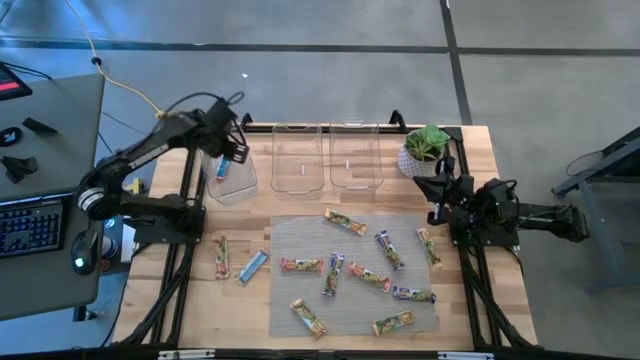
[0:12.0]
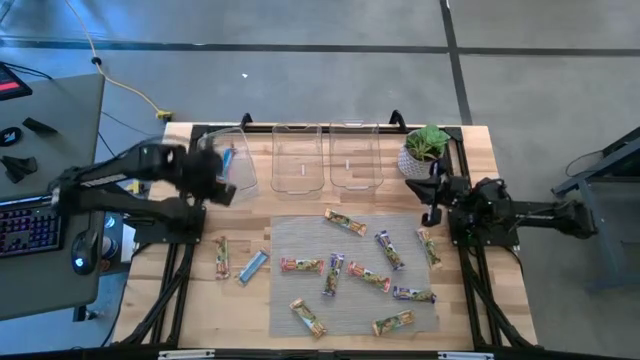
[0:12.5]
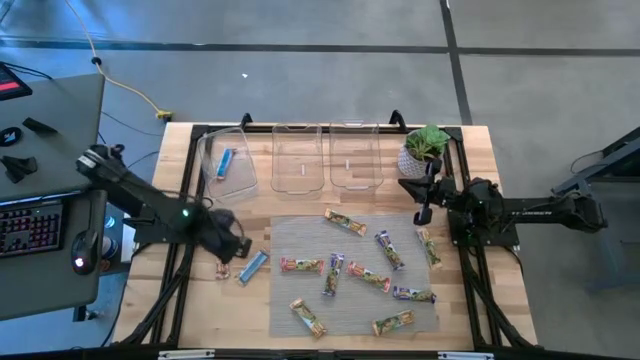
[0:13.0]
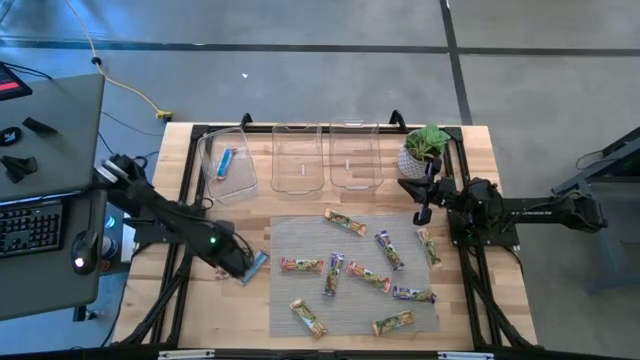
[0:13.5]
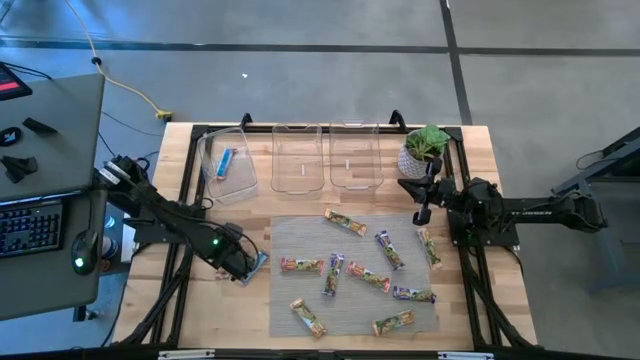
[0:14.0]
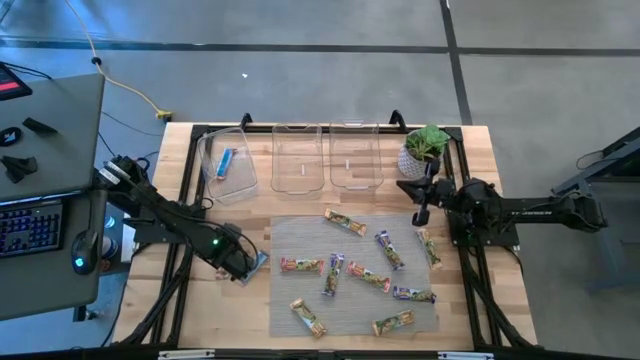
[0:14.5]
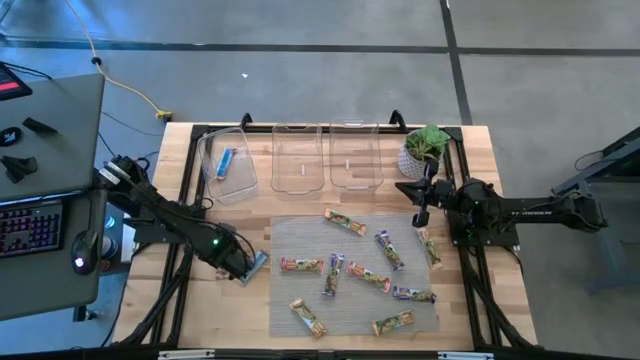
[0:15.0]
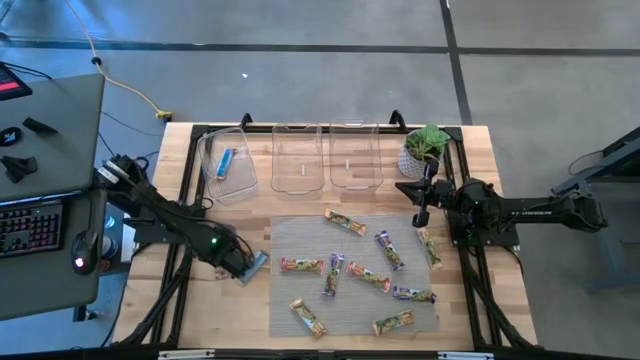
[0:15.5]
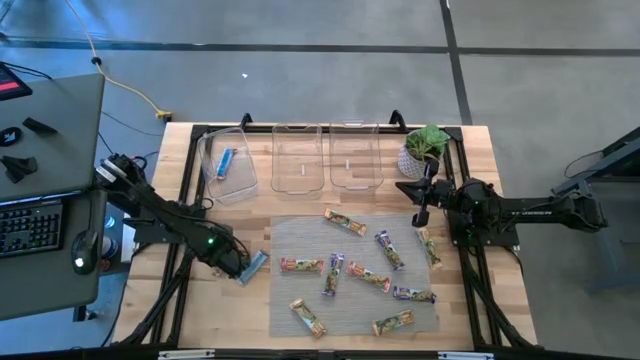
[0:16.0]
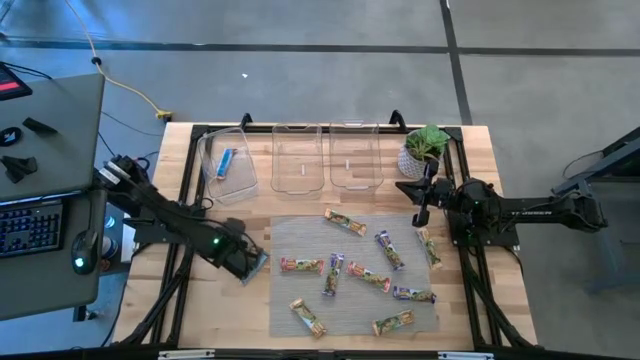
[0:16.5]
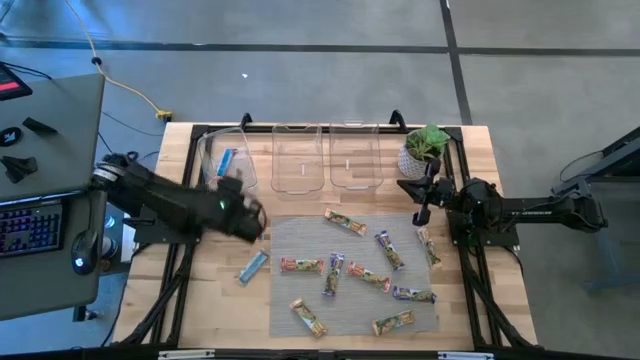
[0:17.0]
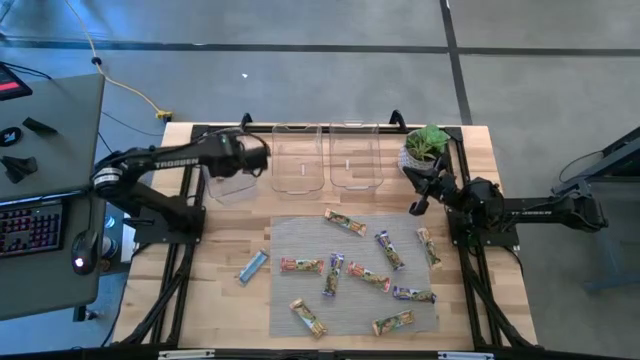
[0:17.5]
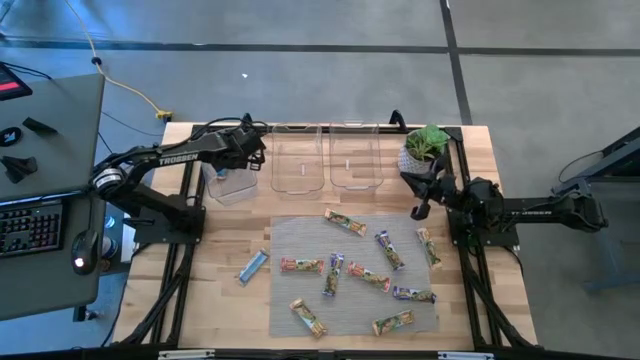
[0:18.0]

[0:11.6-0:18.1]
Task: Pick and place Granola Bars by type
Put the red granola bar into the left transparent bin

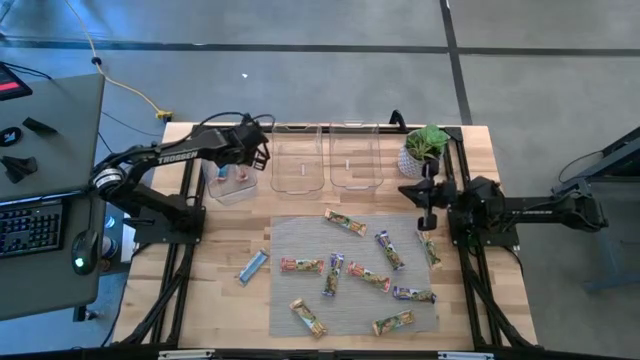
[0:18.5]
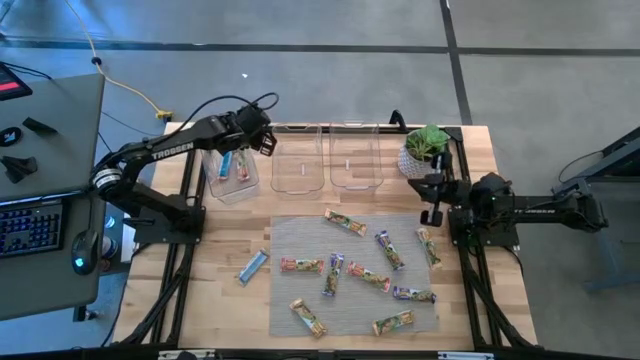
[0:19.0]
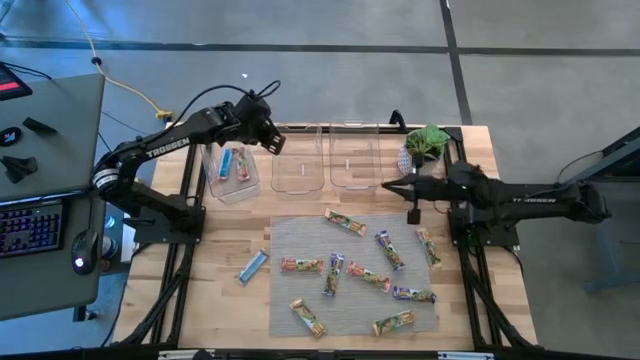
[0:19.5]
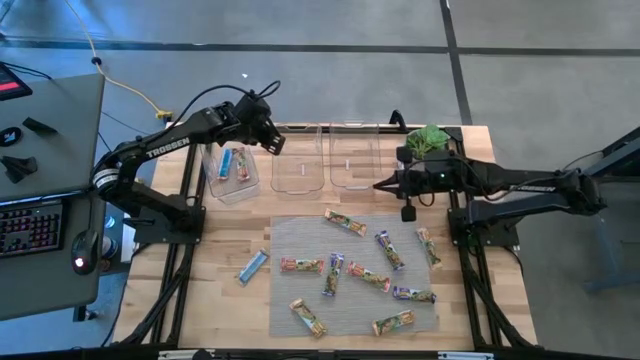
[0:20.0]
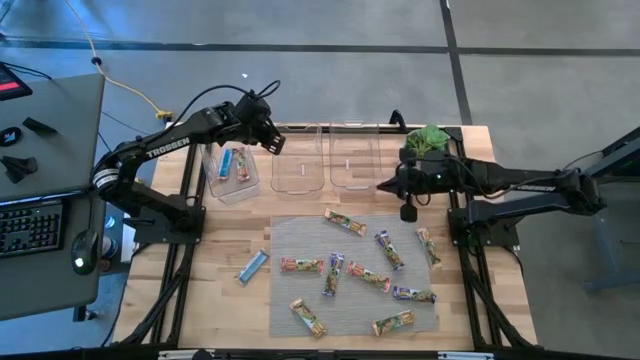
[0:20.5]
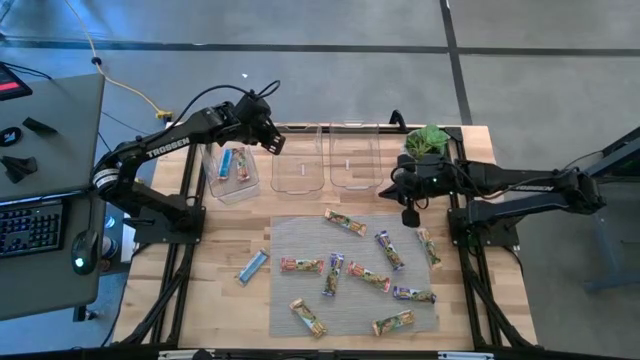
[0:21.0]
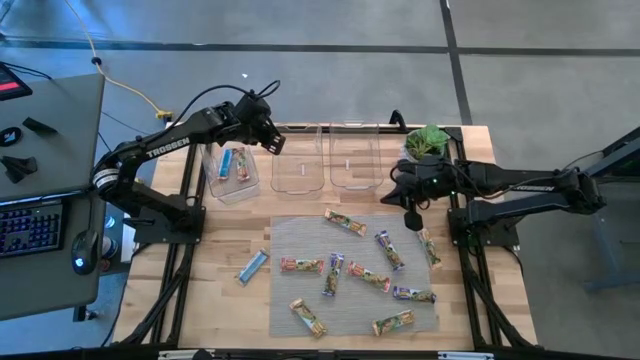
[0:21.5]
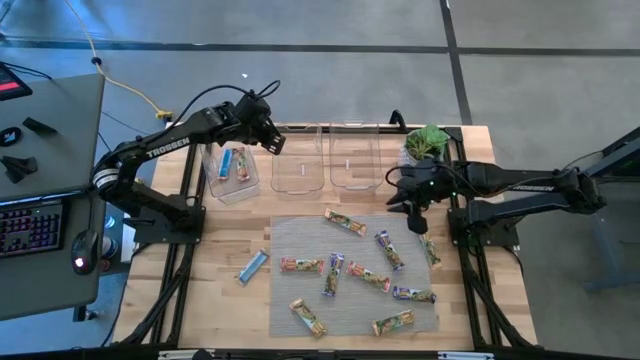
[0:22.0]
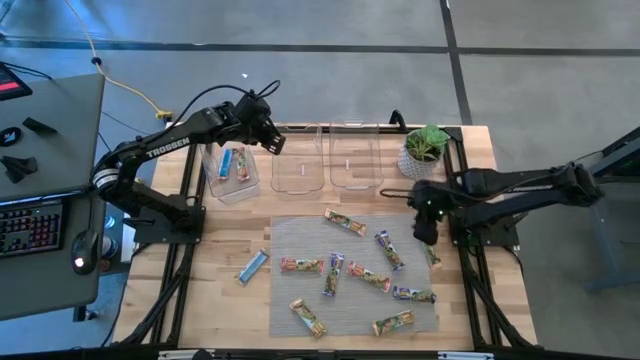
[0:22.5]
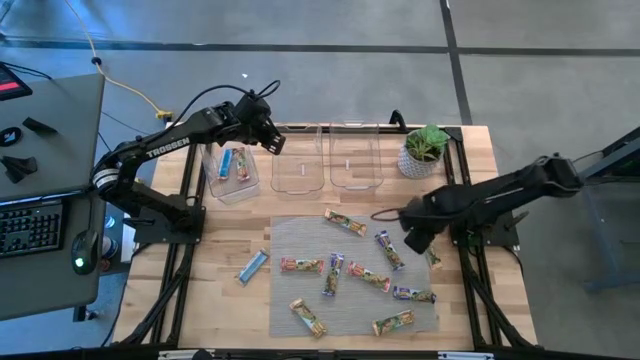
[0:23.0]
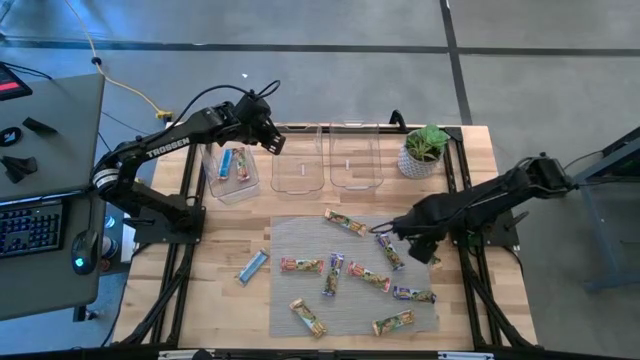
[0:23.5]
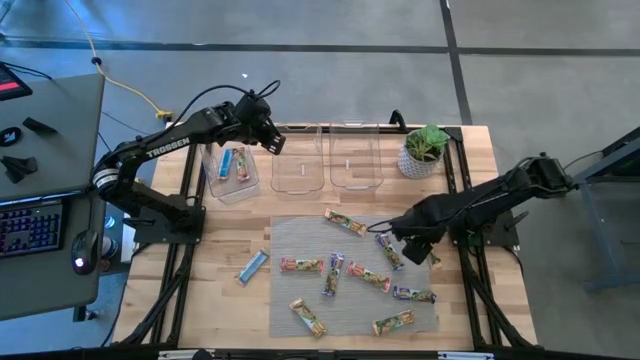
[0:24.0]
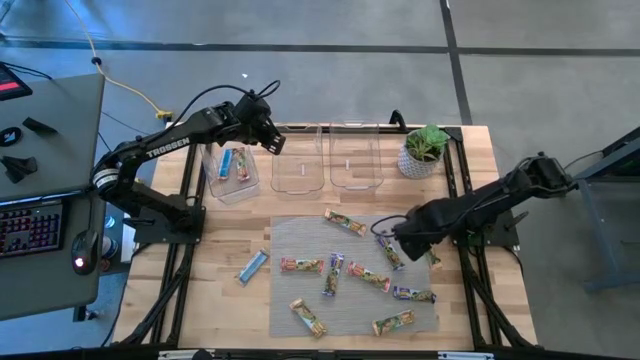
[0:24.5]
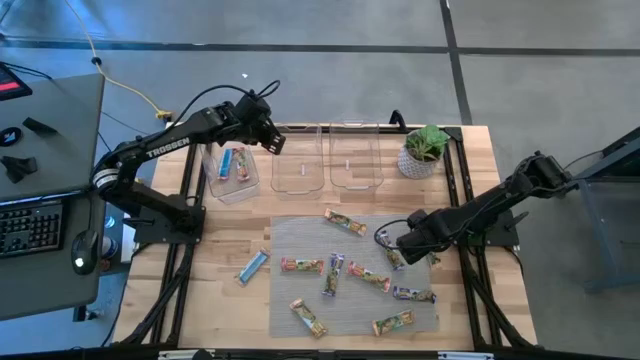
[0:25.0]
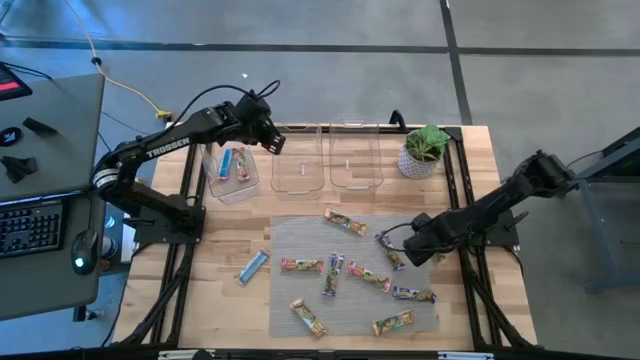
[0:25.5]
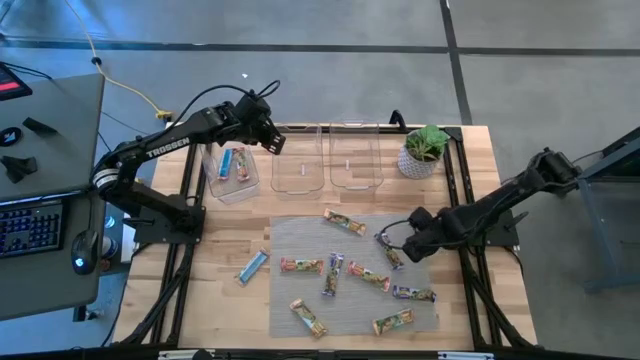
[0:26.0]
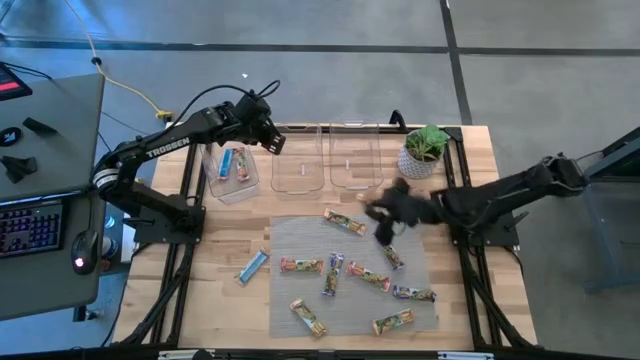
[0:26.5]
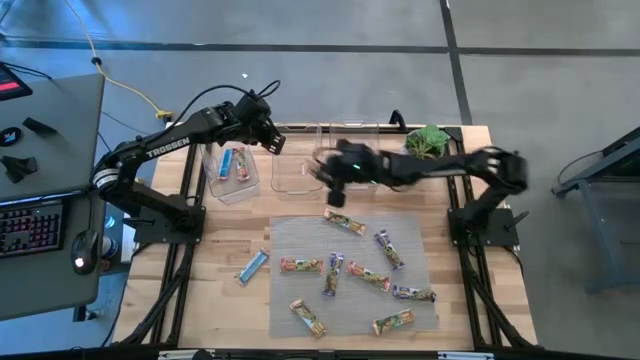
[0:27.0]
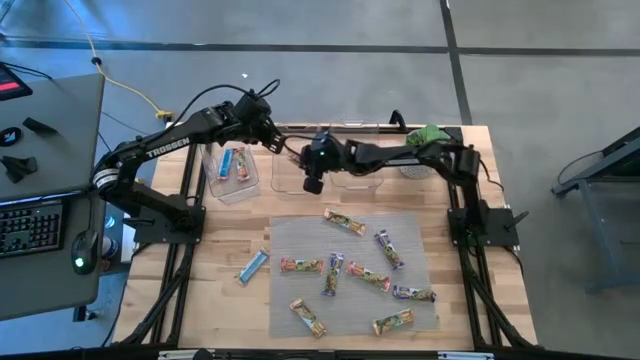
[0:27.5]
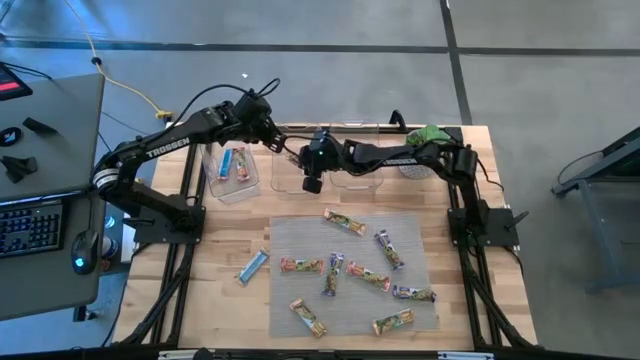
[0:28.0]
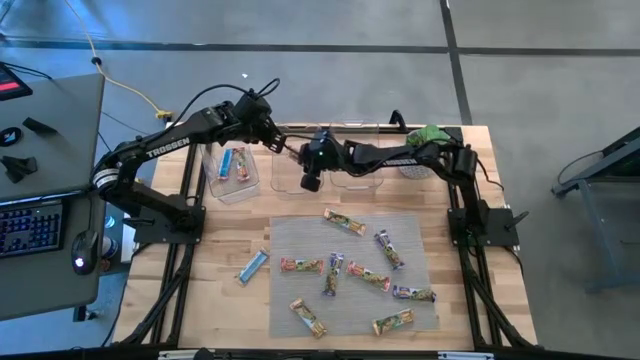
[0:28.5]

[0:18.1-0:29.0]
Put the yellow granola bar into the middle transparent bin

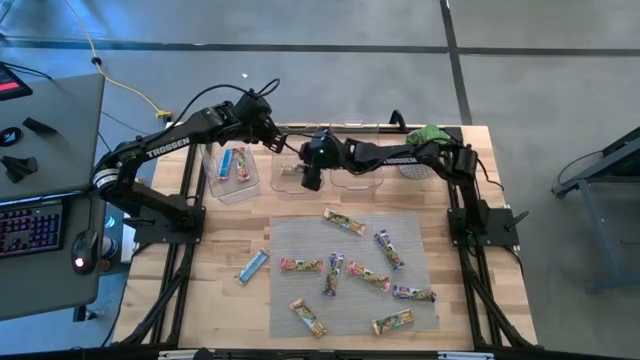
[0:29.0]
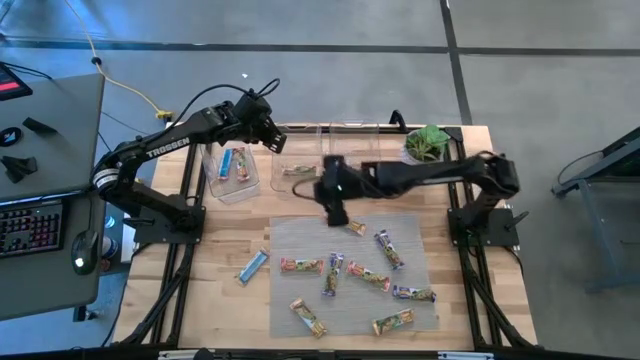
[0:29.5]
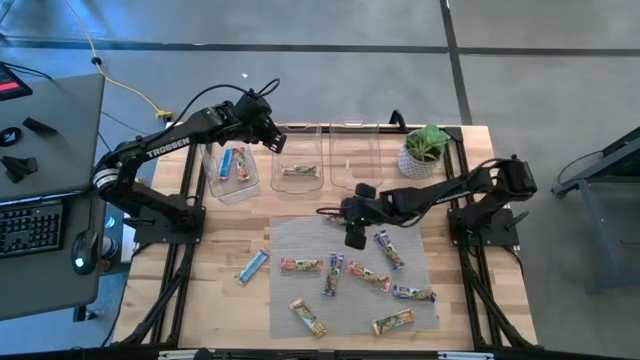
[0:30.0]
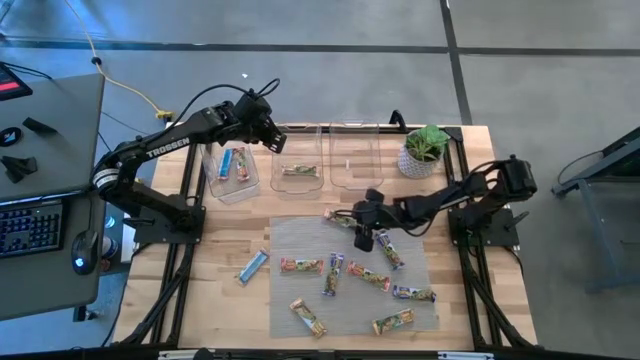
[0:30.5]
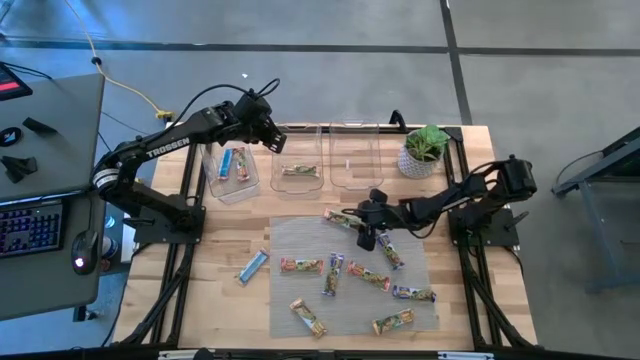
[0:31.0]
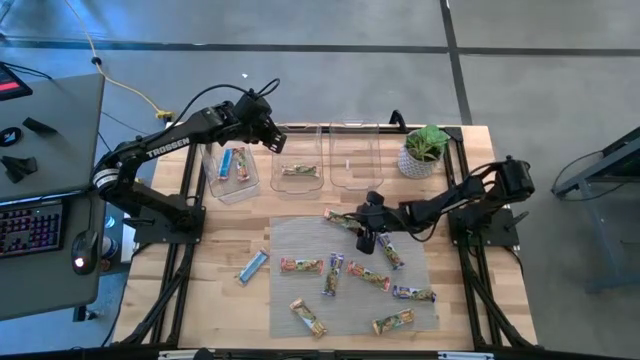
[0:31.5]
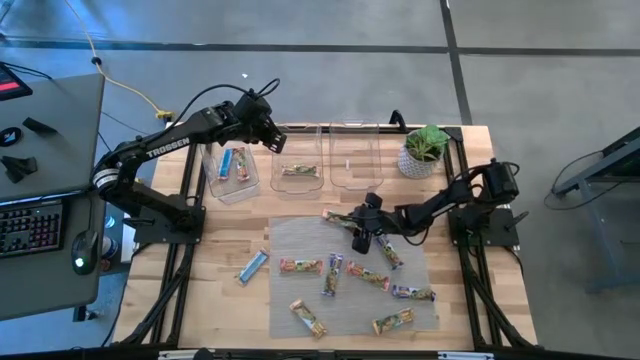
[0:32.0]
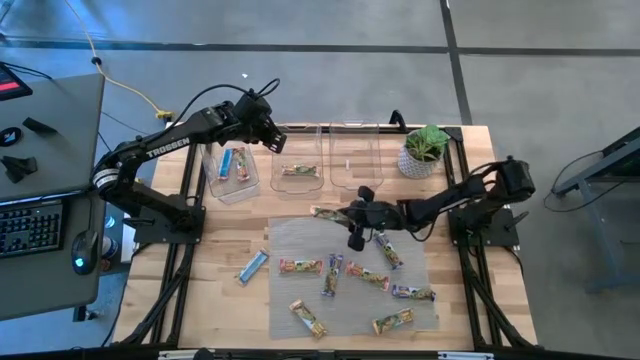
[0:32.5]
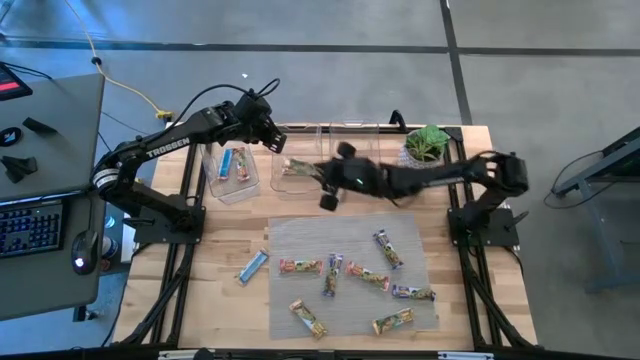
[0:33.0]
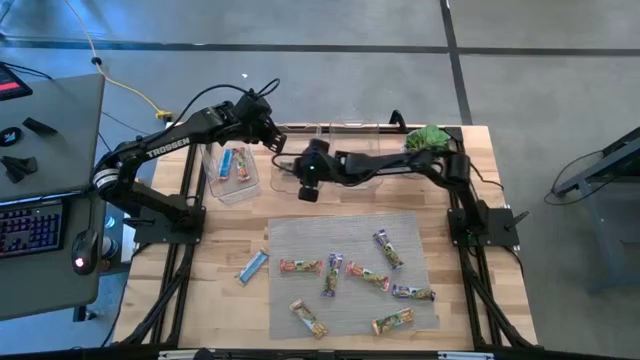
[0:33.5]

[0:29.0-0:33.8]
Put the yellow granola bar into the middle transparent bin
